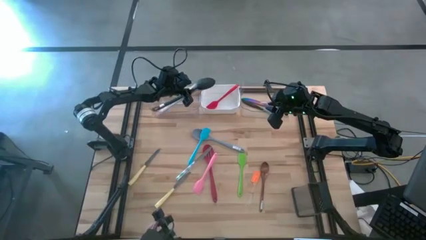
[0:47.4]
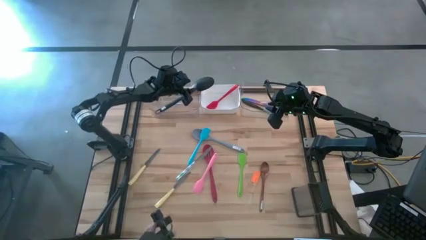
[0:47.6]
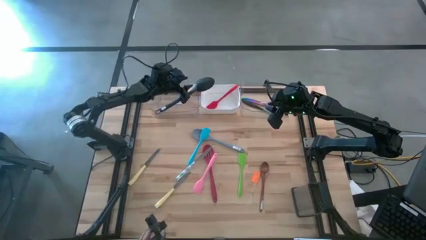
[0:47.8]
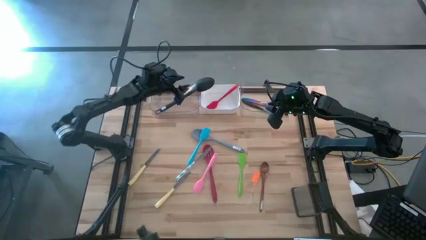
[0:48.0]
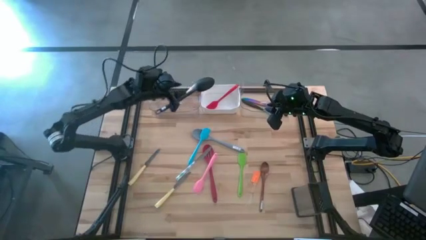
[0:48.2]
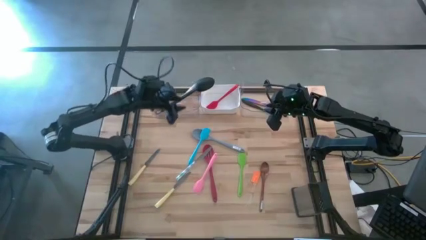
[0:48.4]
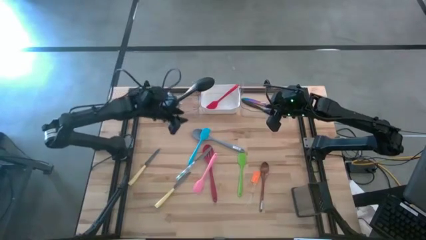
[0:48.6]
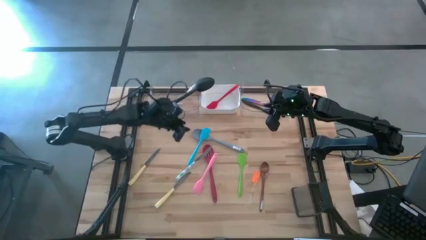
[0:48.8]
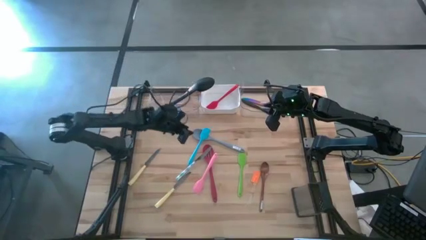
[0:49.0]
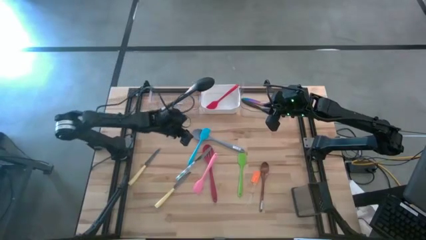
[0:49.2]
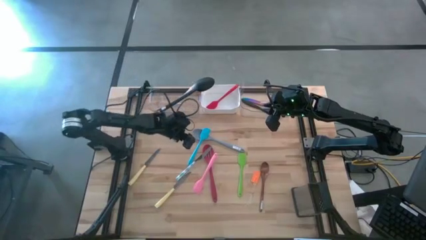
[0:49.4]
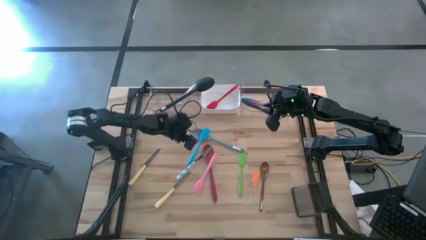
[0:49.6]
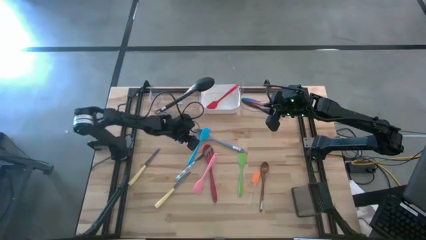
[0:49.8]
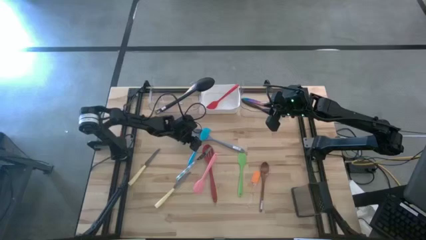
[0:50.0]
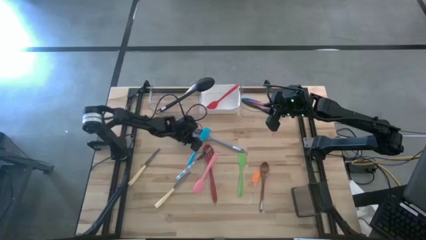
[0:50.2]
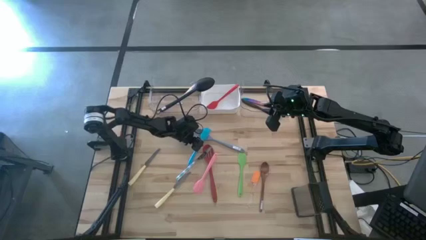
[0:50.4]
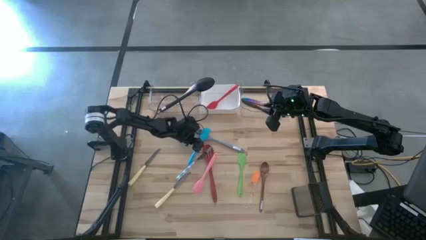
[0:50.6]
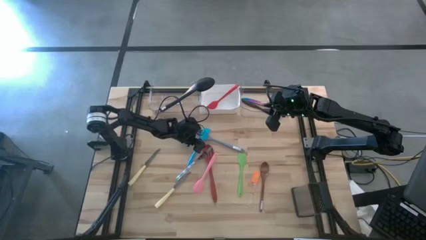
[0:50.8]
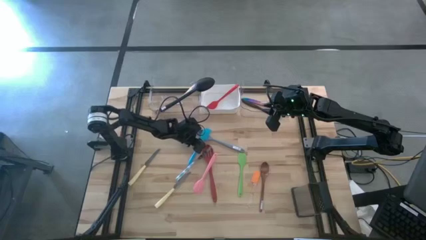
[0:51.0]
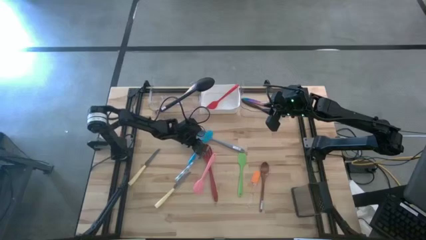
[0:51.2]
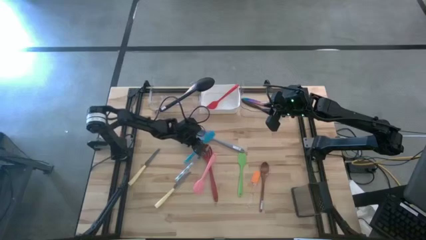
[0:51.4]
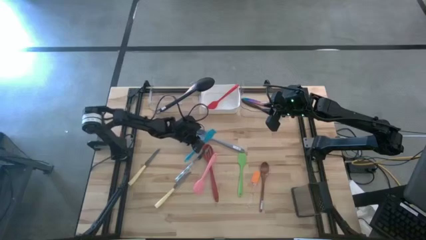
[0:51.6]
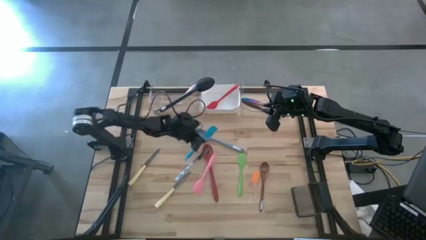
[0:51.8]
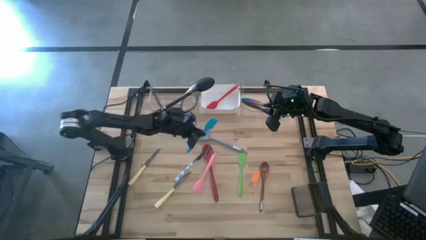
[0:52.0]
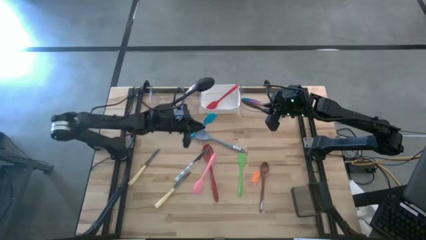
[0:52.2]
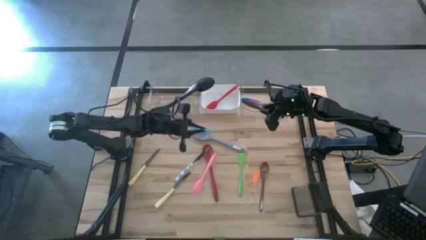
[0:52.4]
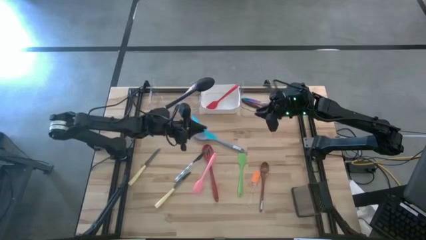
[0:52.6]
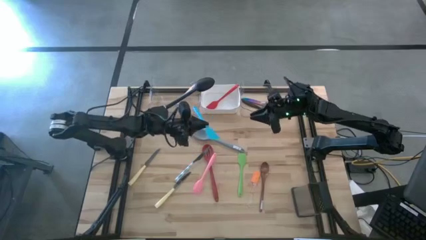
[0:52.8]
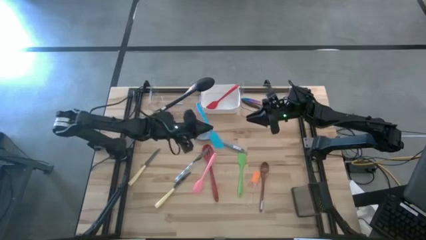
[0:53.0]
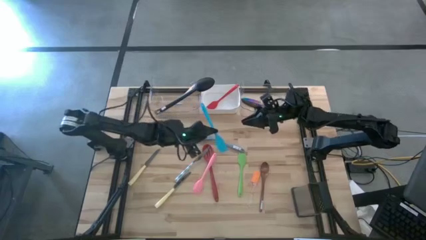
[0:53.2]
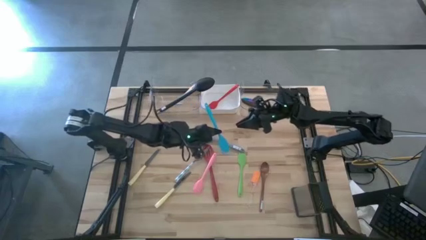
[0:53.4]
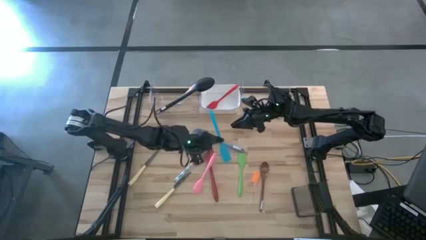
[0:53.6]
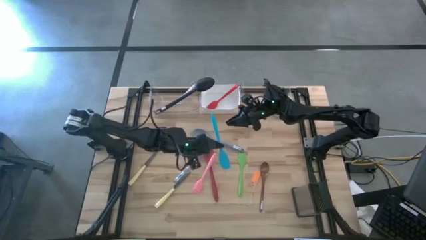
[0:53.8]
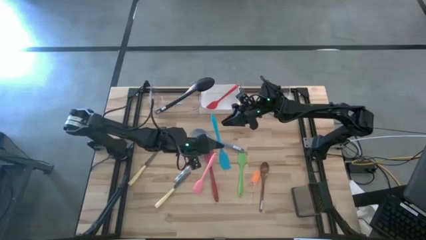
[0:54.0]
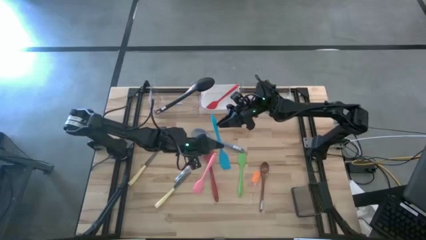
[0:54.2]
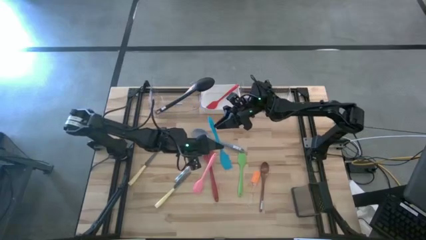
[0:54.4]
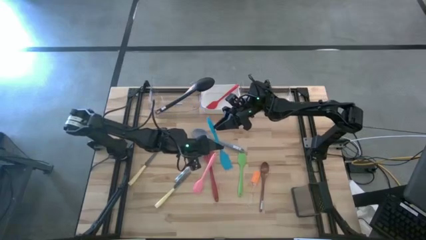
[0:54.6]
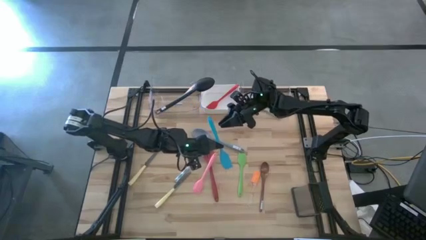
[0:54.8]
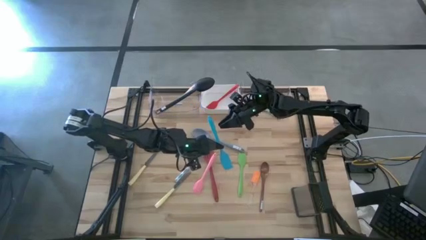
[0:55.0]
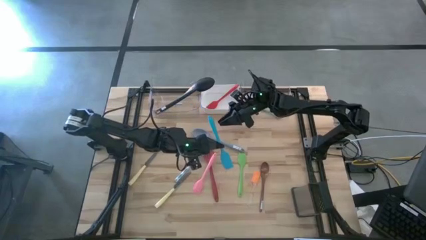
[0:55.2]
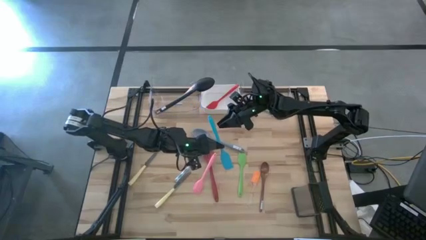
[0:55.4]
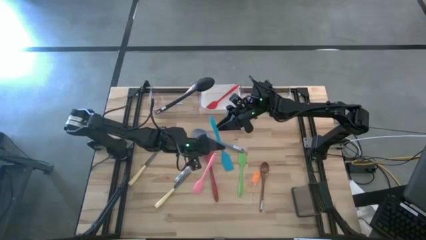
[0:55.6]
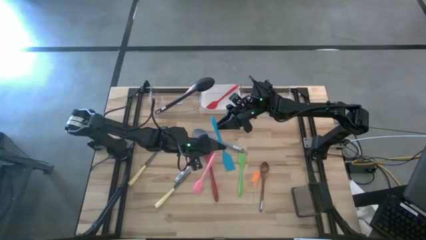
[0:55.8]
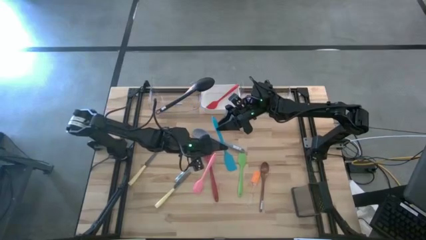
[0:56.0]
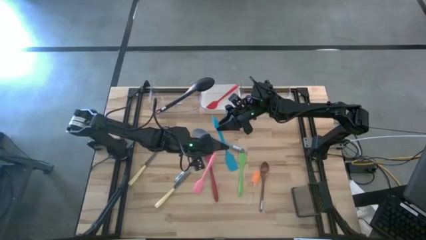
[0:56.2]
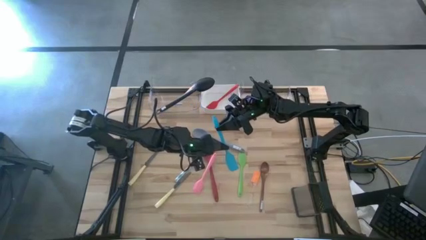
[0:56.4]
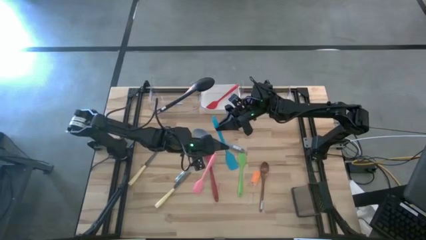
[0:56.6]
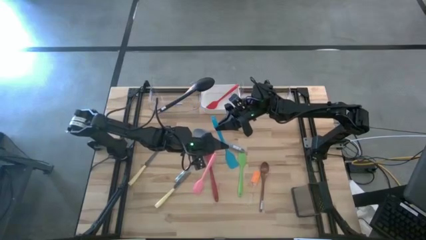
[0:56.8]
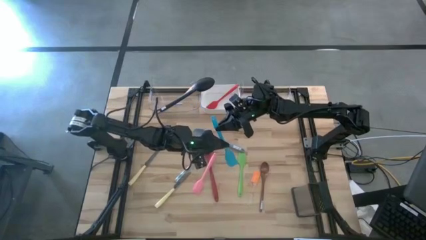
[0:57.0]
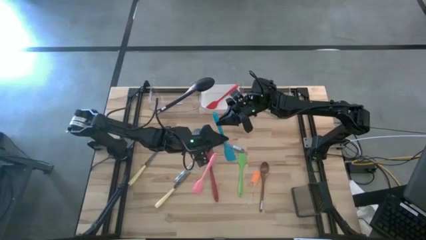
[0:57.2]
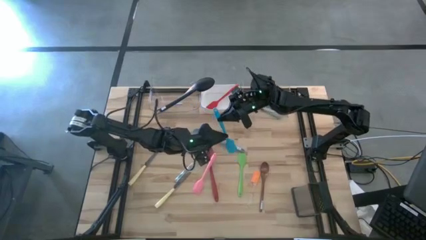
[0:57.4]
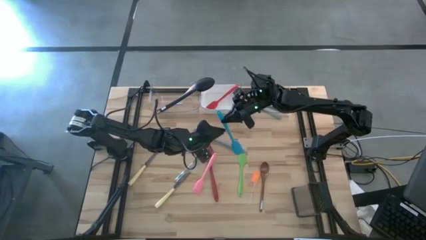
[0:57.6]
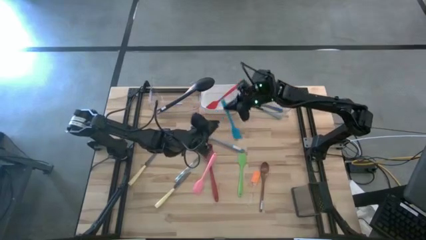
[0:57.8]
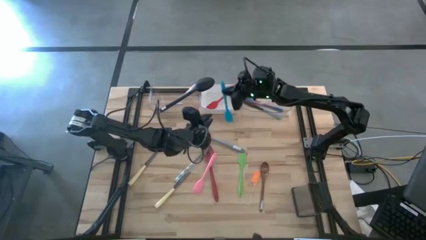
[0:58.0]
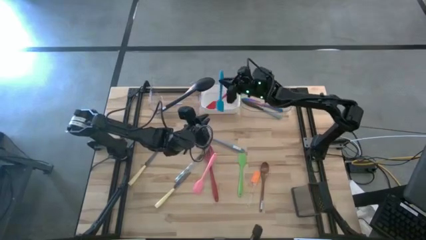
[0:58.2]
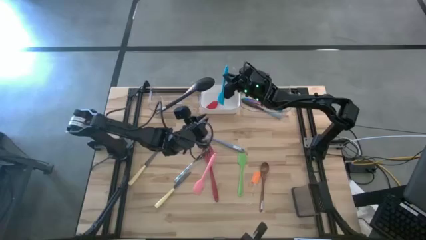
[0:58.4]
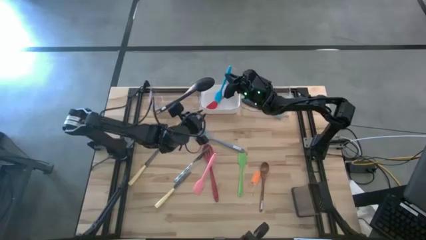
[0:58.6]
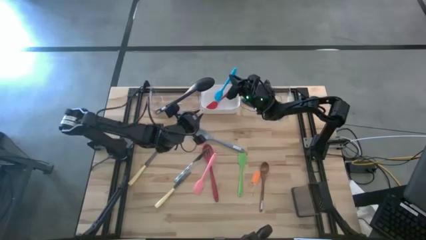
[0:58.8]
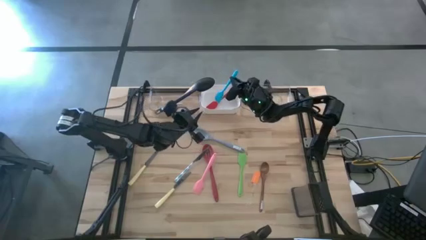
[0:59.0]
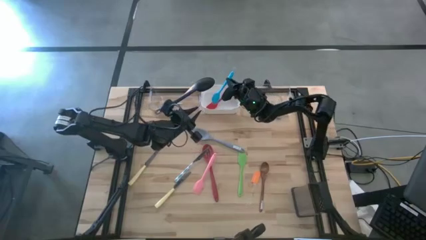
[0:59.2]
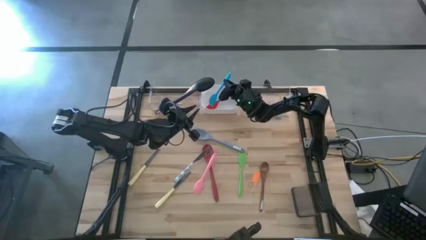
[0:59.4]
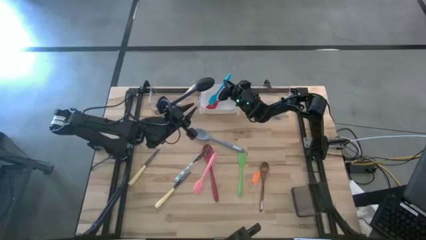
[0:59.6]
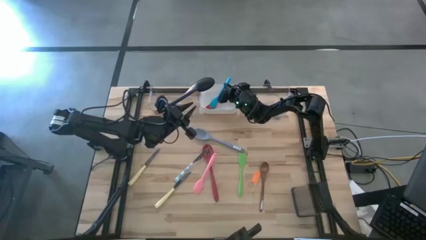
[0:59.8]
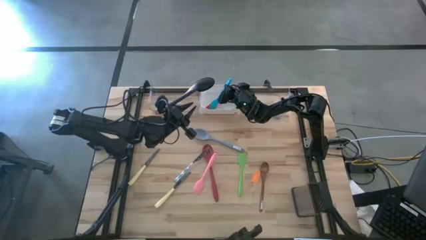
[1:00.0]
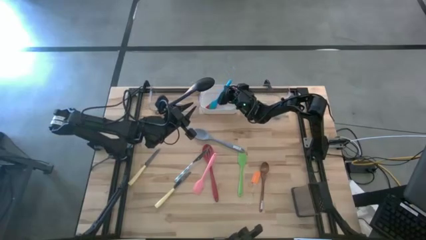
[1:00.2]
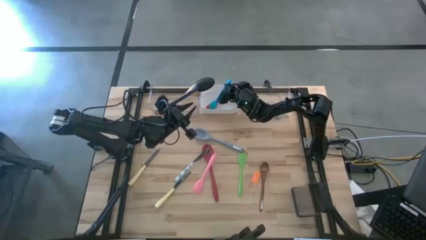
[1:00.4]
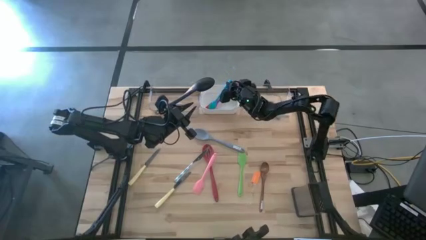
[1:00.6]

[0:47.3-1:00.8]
Task: Pick & Place Kitchen Items
Put the blue spatula into the white bin

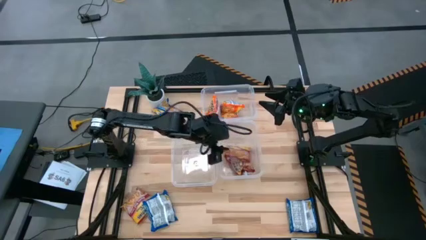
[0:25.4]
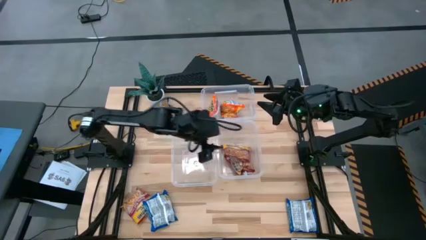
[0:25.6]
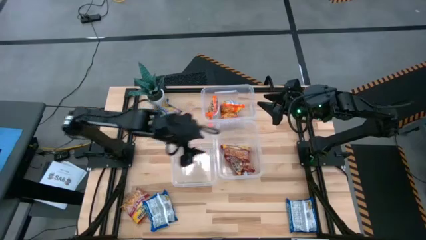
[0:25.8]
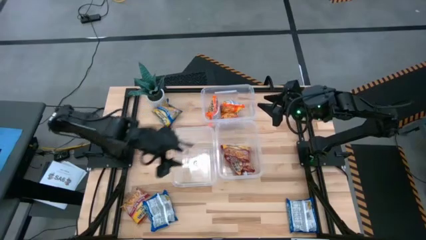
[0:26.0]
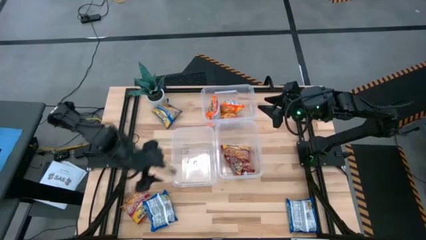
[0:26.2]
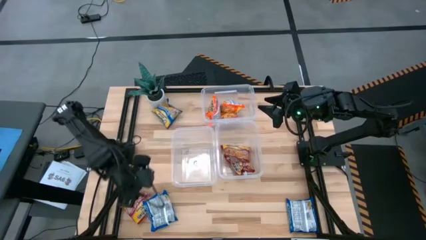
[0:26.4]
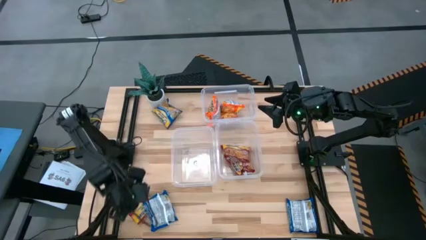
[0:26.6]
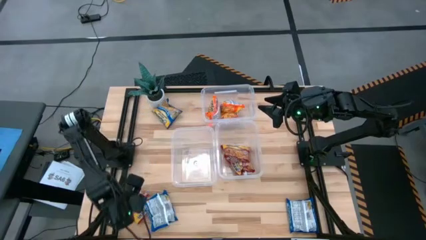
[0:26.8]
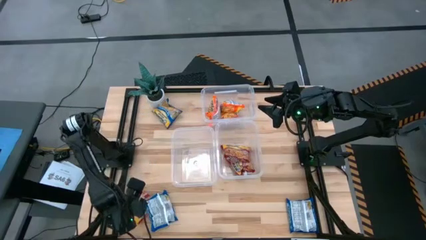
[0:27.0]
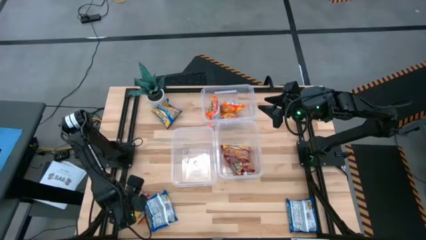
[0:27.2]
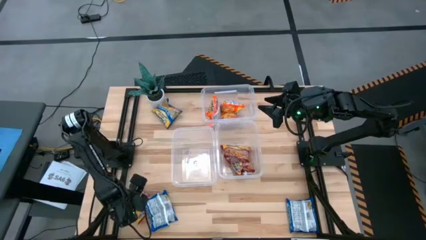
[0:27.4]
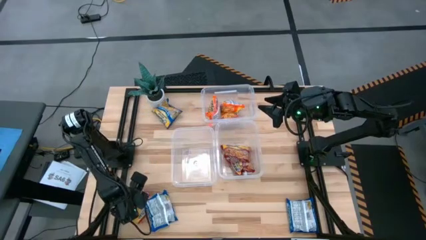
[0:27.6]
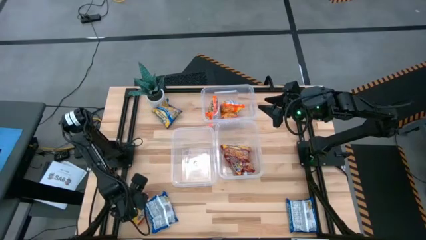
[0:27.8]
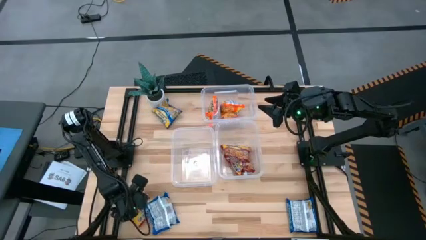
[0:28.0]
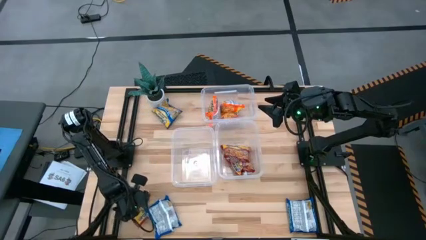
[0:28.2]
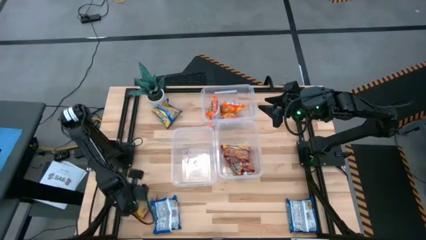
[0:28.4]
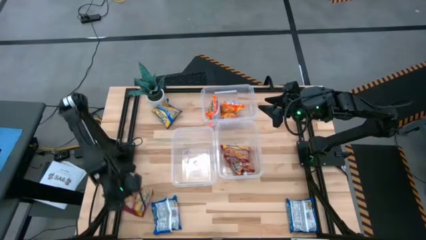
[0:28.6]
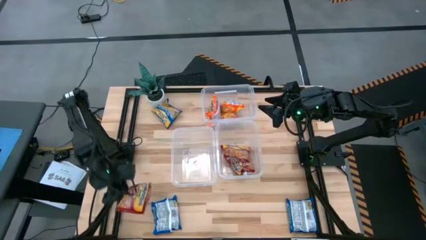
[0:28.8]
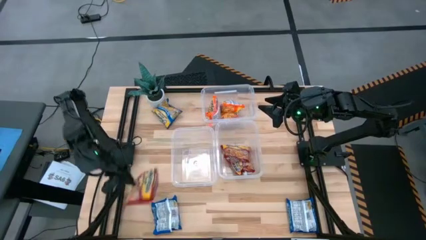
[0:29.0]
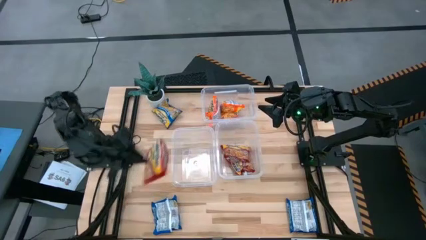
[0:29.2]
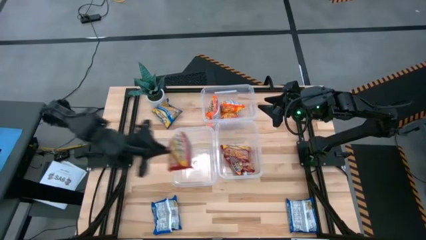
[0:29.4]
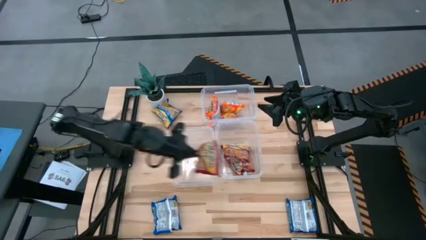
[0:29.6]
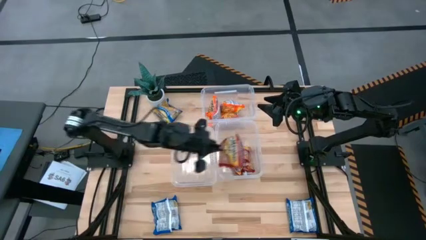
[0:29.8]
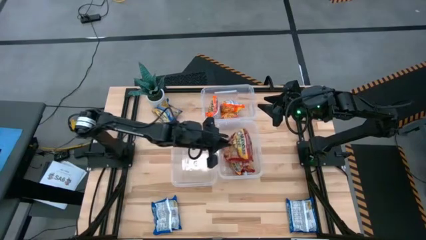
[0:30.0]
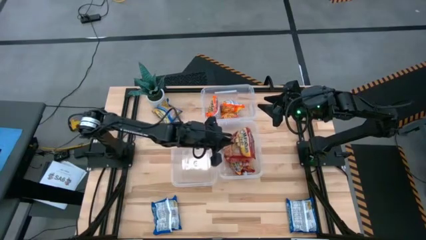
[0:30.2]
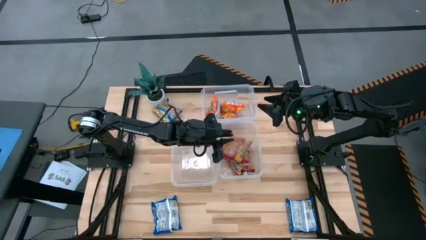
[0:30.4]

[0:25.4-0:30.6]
Task: Sort Maruchan noodles
Put the red noodle pack into the bottom right transparent bin
